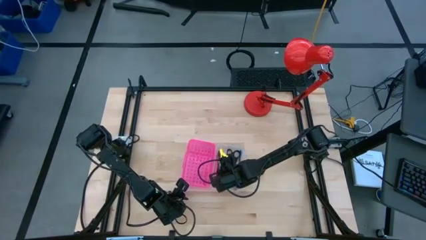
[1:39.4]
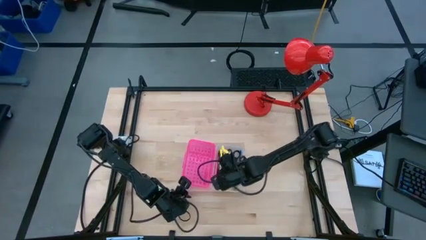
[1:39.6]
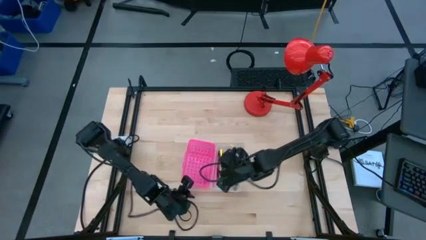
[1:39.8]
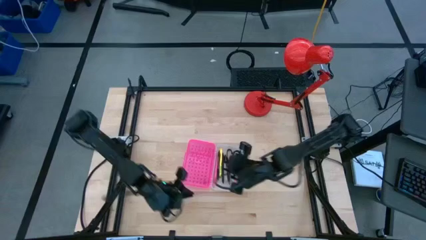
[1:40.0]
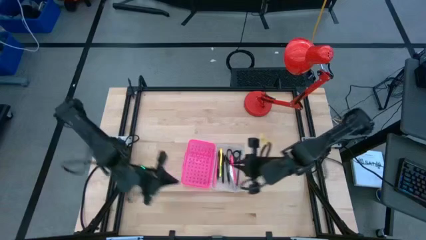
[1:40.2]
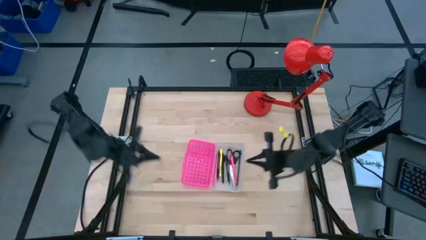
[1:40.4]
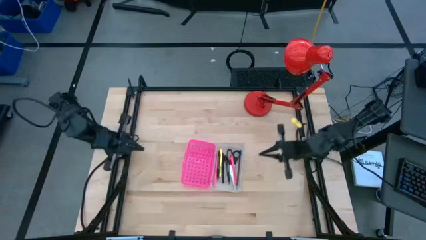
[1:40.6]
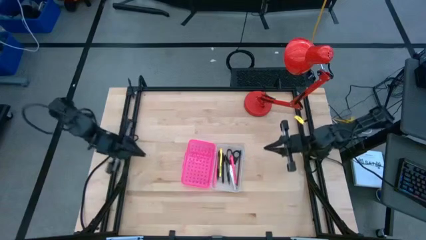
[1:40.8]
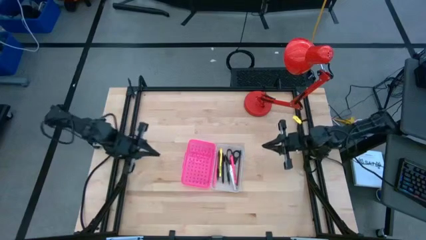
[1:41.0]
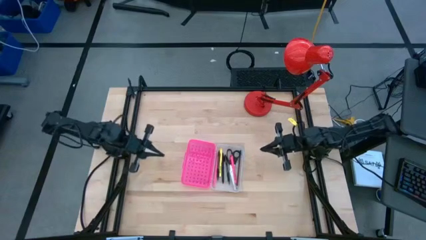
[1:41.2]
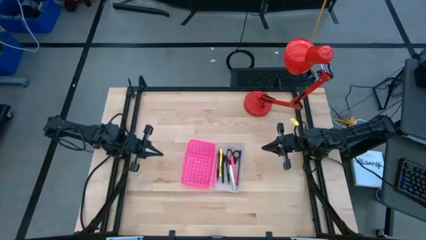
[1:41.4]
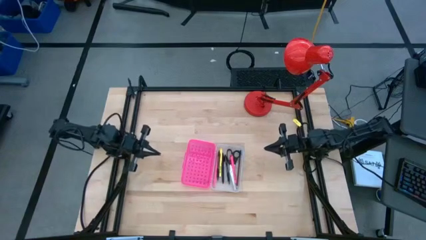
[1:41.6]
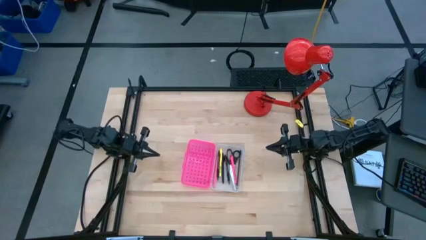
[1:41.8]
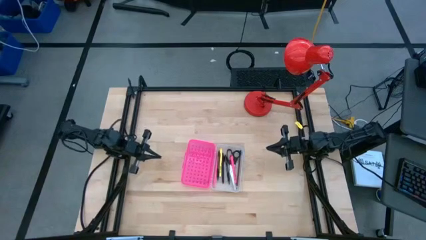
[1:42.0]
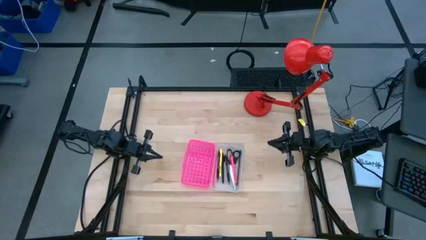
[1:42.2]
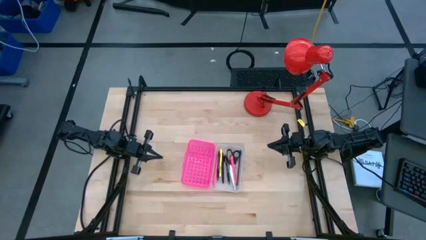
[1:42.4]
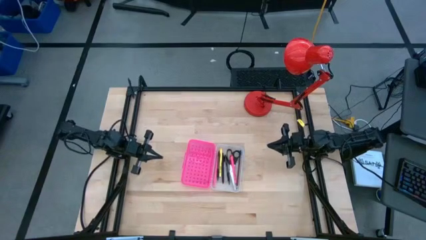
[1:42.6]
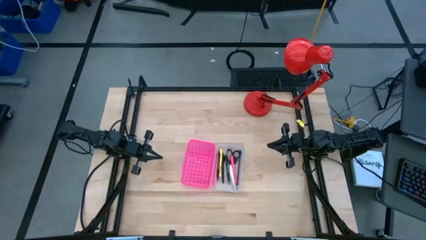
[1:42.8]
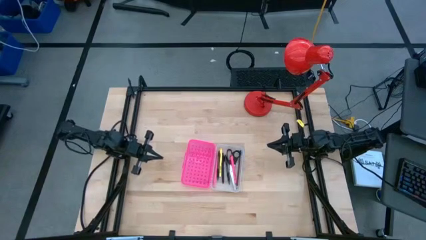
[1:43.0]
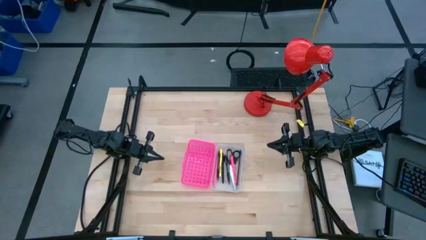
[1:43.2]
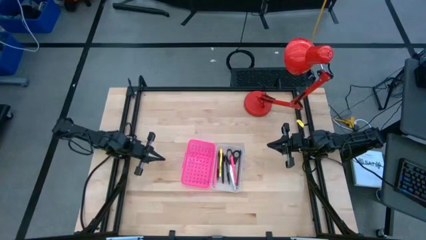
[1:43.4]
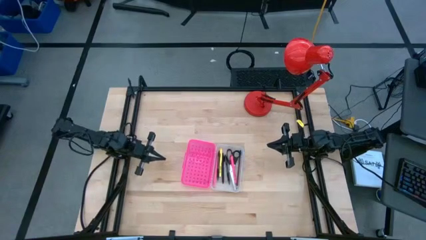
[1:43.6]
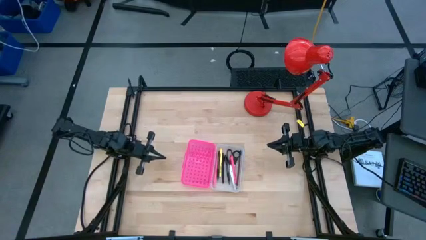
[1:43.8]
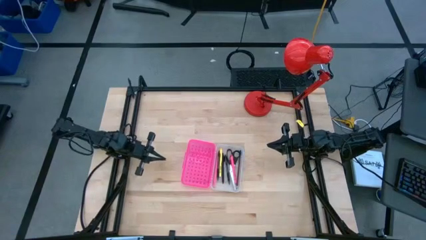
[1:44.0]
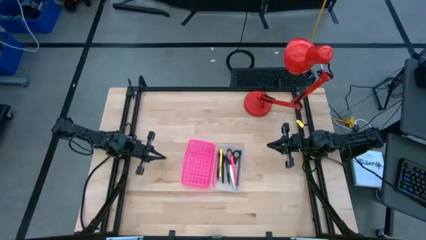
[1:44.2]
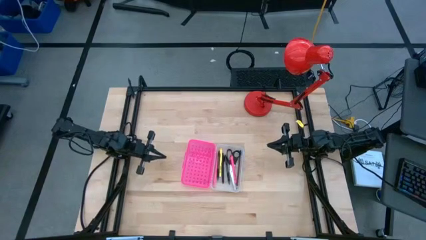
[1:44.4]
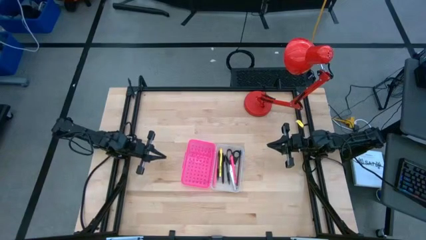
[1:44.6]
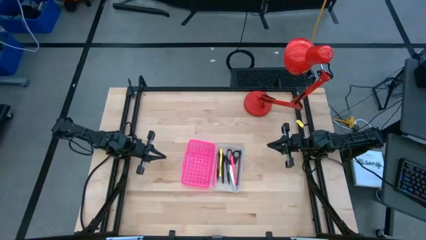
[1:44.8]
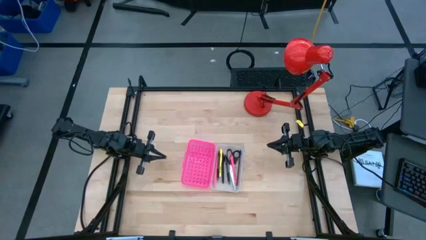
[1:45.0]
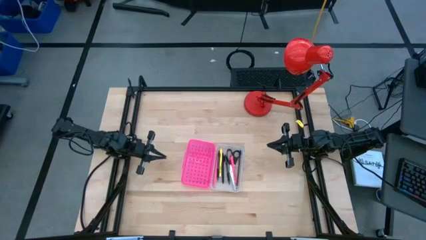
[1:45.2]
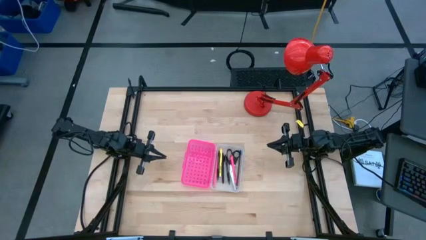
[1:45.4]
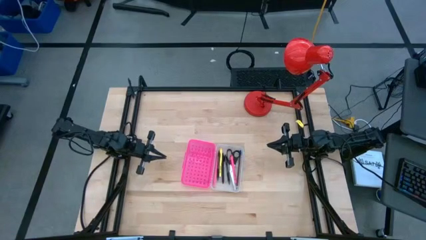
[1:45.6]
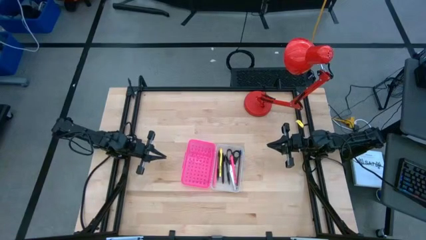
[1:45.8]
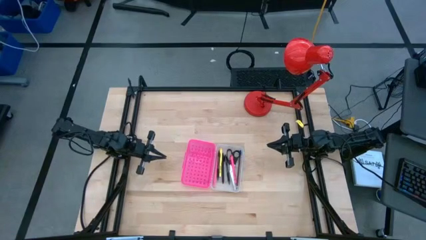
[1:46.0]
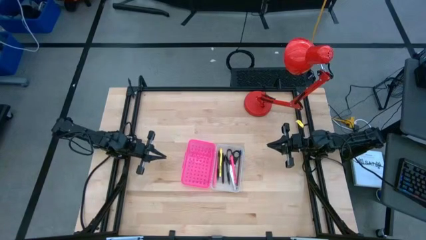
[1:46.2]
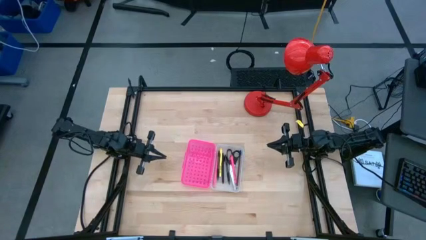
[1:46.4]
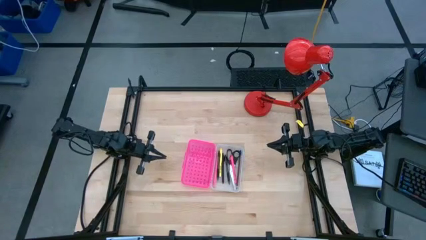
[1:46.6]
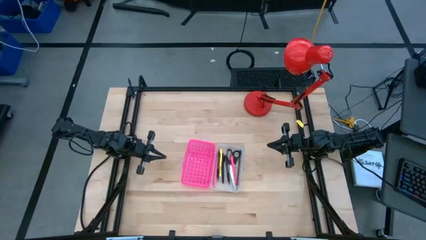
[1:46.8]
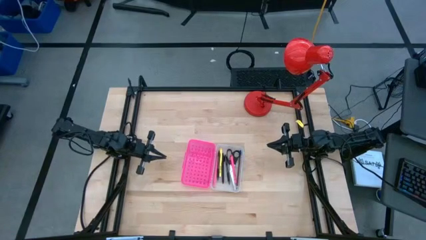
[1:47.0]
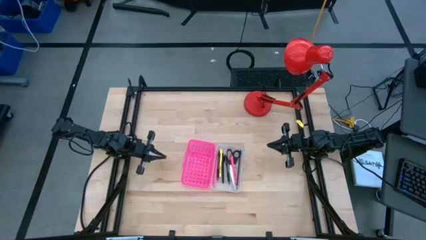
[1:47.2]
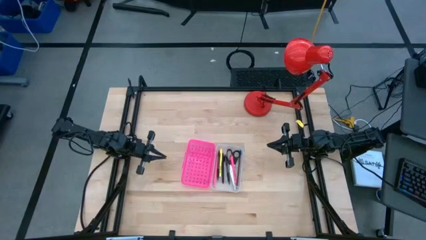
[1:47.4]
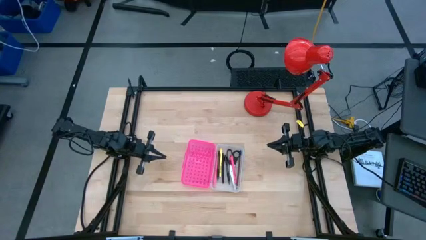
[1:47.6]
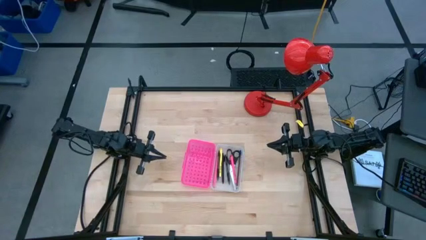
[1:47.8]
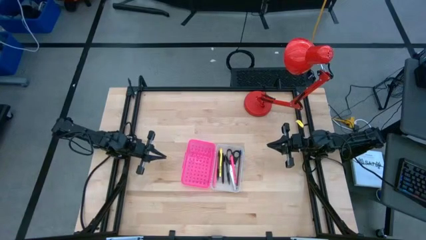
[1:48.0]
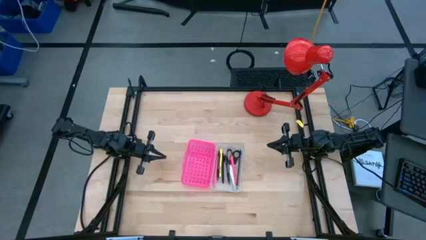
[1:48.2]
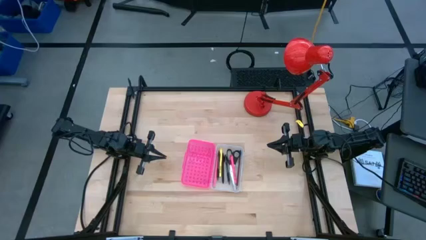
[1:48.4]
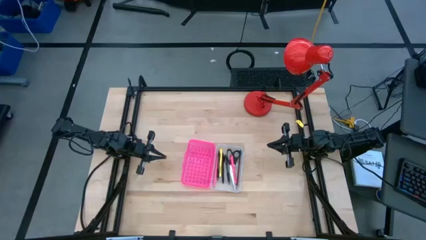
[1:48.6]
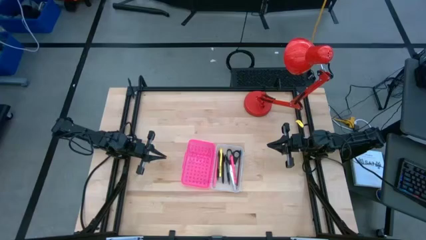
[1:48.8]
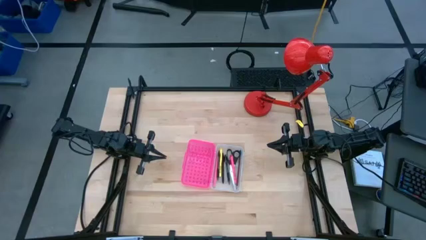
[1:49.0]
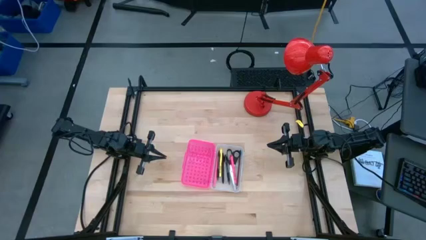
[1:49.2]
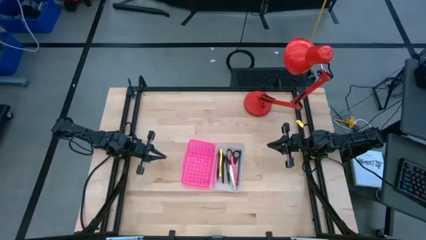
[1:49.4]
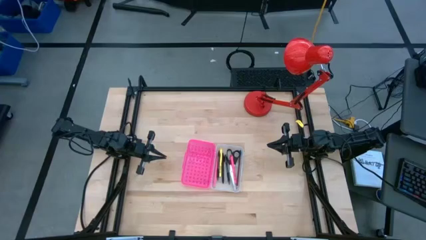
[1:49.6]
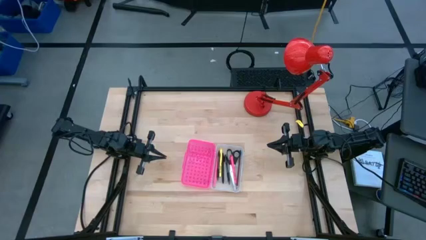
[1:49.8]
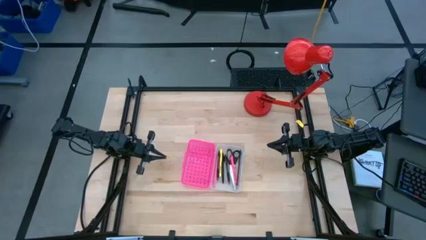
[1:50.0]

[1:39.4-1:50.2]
Task: Pick & place school supplies into a supply box
Return to Home Position

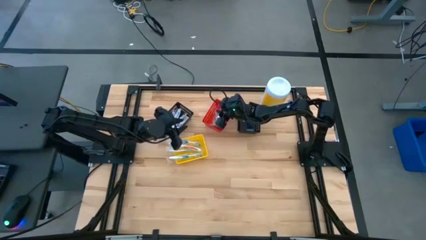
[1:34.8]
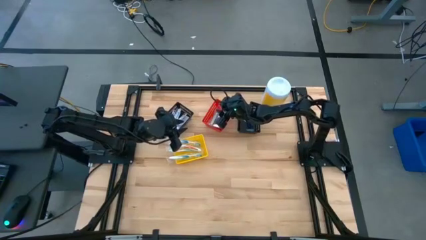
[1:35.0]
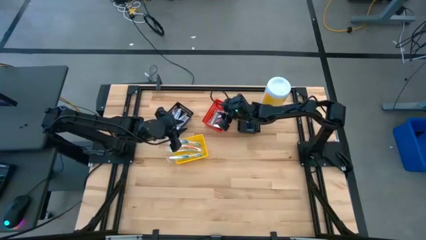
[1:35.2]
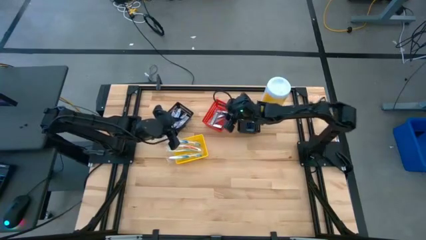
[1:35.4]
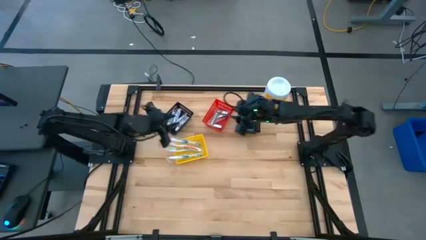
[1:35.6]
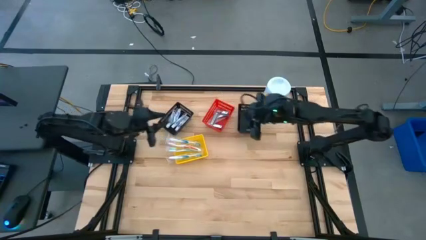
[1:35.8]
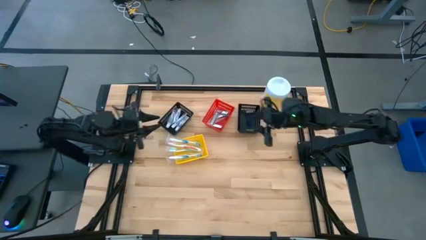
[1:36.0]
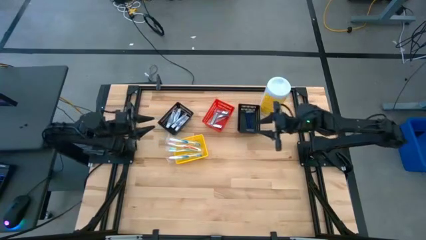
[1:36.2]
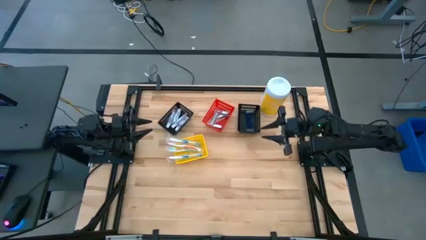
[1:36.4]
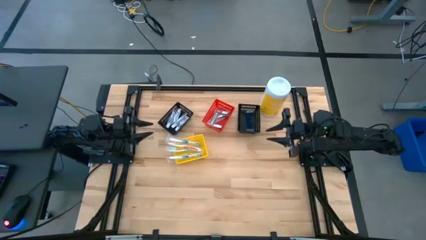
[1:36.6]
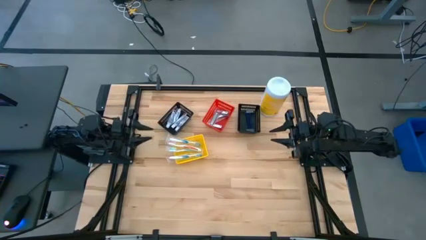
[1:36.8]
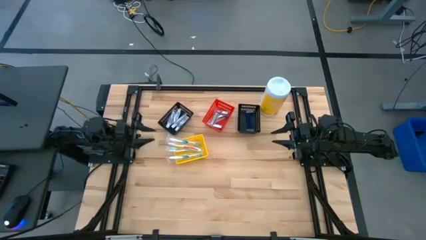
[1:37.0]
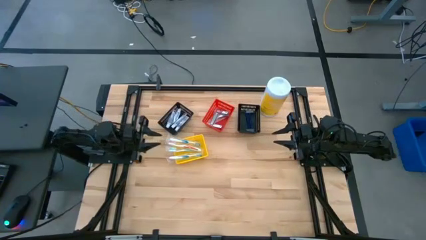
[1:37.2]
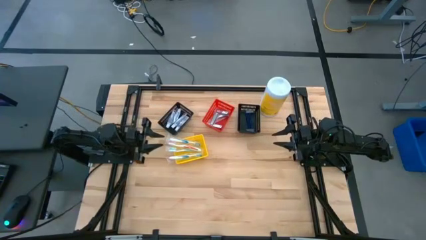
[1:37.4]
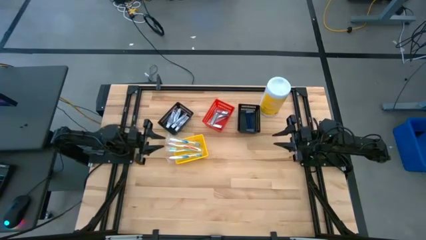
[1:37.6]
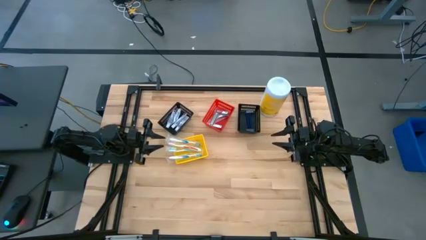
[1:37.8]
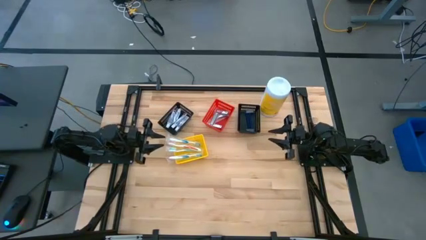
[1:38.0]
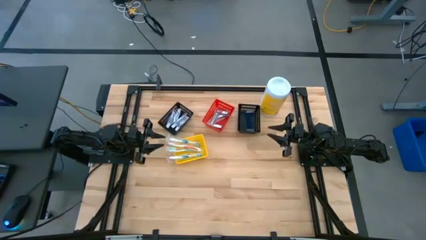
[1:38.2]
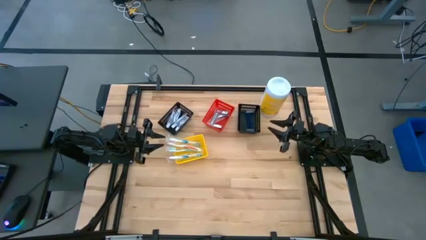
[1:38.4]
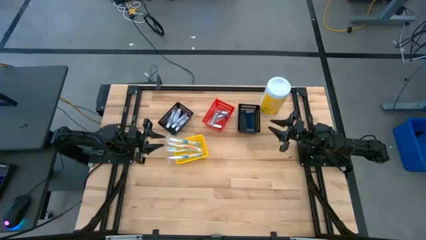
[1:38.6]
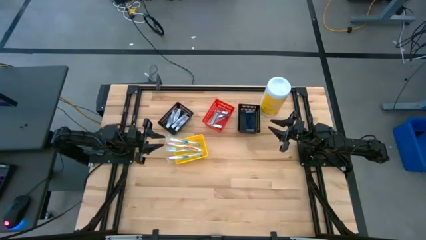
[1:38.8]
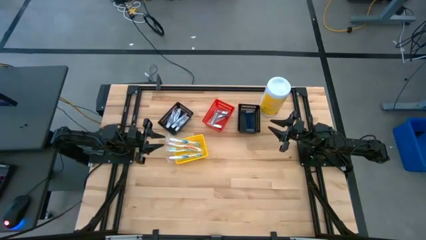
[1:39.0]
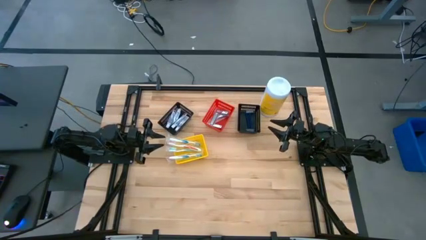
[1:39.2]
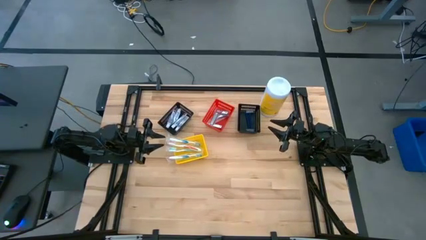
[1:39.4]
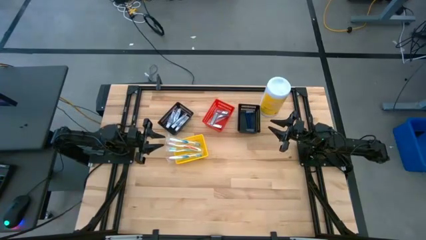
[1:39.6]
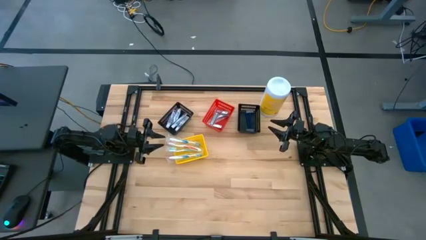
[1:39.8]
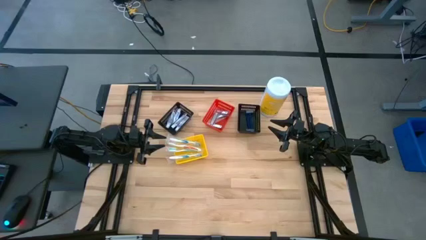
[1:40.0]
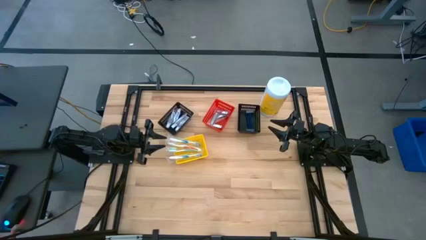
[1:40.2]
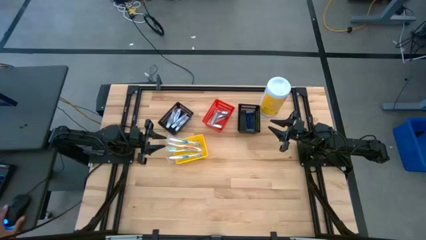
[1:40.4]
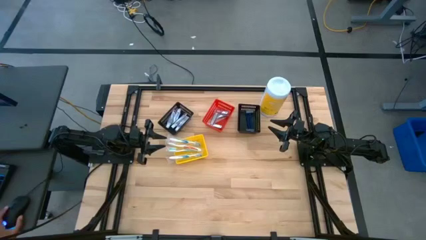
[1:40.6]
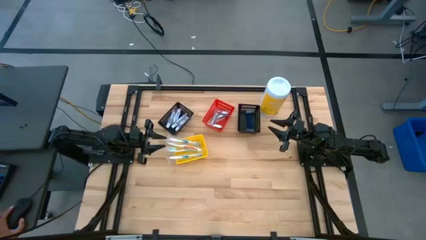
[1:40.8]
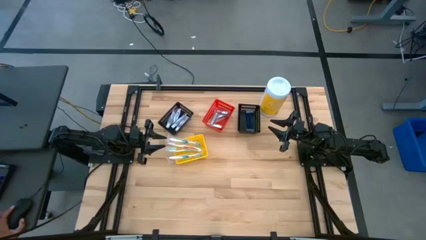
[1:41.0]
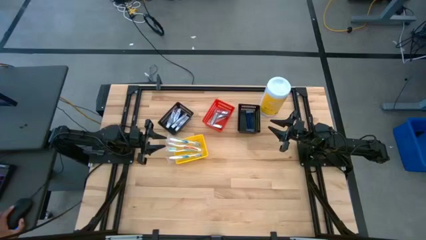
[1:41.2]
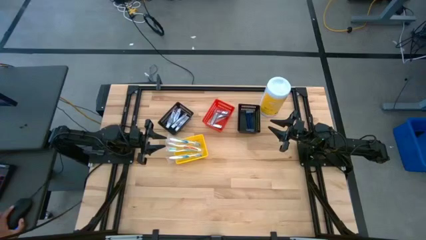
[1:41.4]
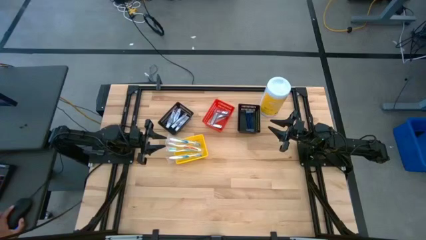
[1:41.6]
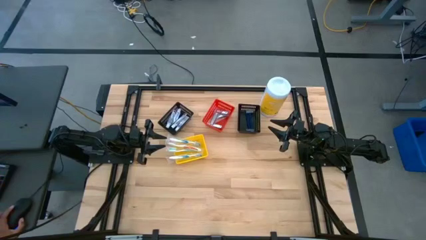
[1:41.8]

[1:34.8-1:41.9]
Task: Pick & Place Travel size toiletries
Return to Home Position
